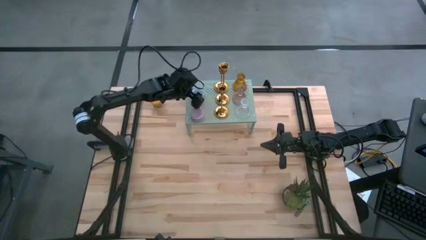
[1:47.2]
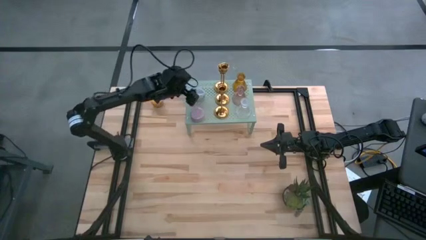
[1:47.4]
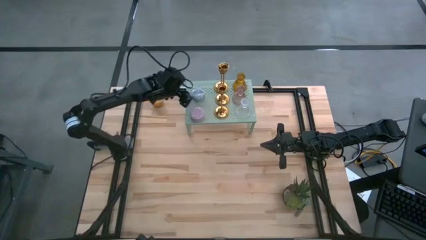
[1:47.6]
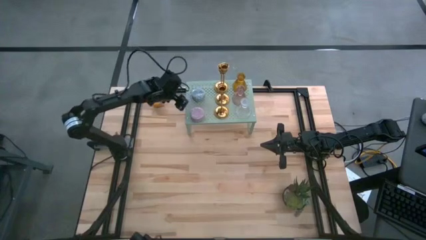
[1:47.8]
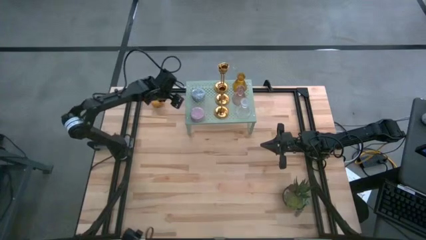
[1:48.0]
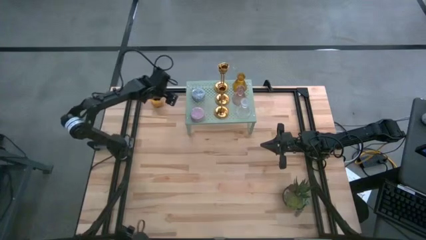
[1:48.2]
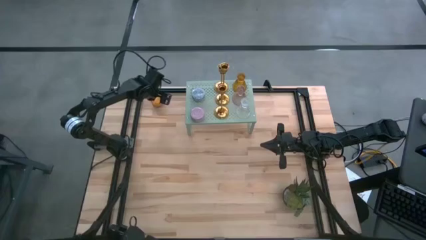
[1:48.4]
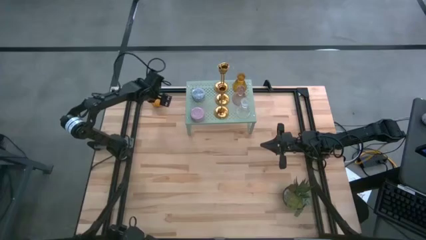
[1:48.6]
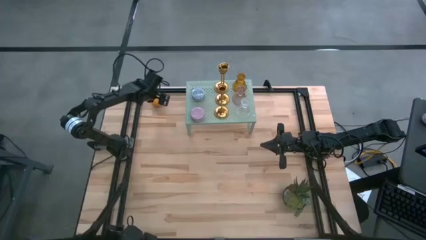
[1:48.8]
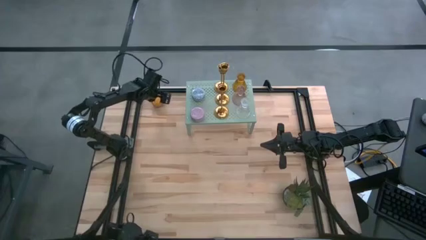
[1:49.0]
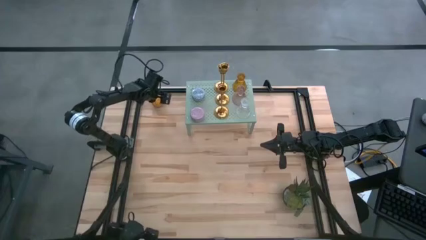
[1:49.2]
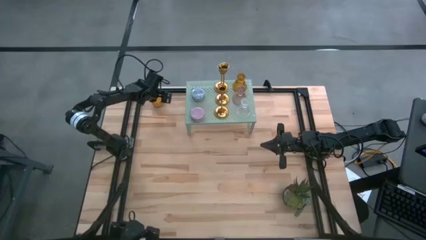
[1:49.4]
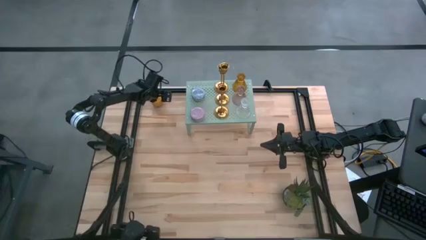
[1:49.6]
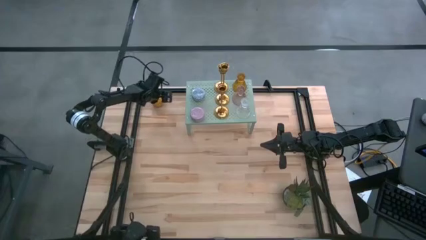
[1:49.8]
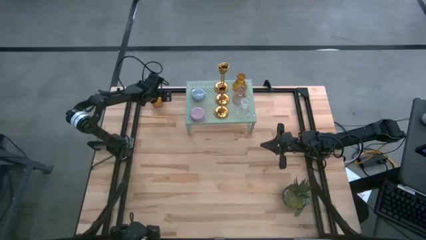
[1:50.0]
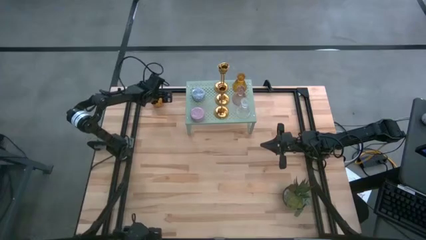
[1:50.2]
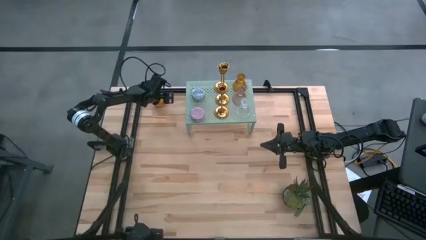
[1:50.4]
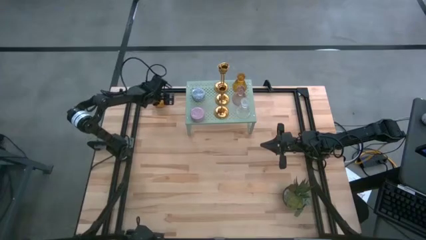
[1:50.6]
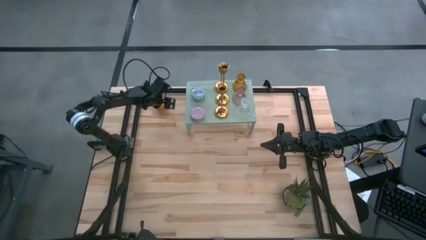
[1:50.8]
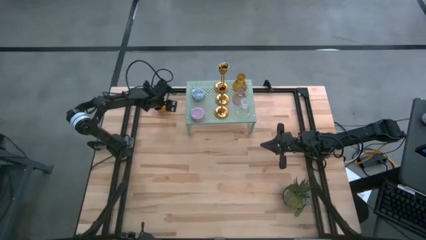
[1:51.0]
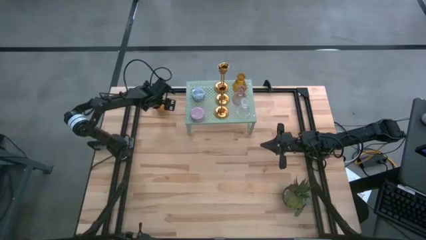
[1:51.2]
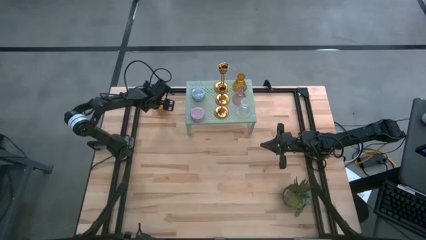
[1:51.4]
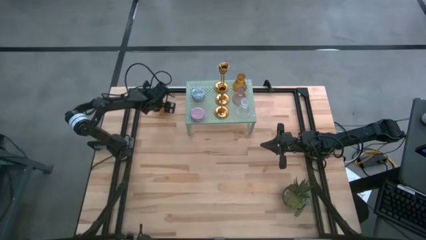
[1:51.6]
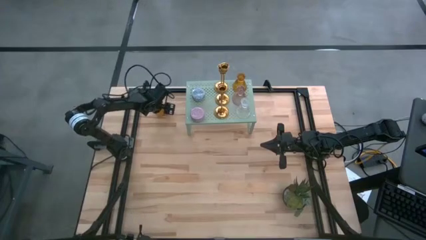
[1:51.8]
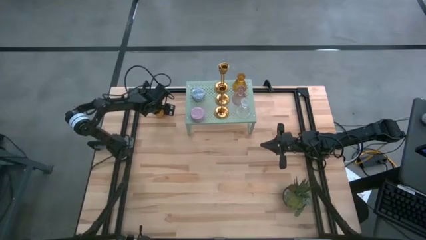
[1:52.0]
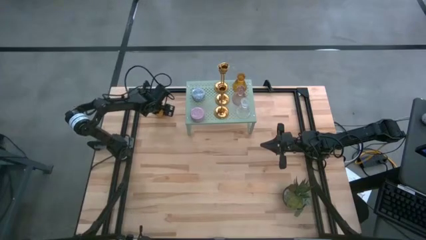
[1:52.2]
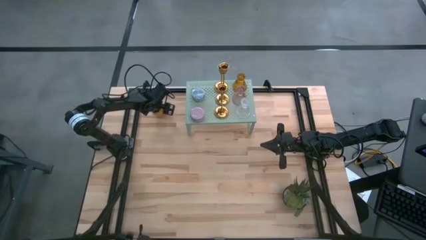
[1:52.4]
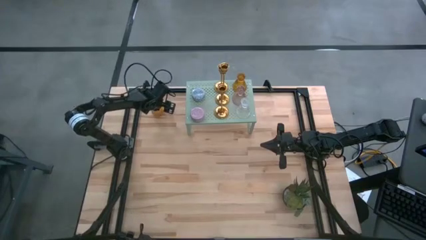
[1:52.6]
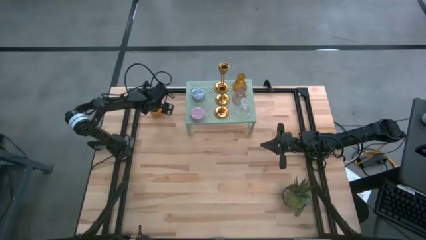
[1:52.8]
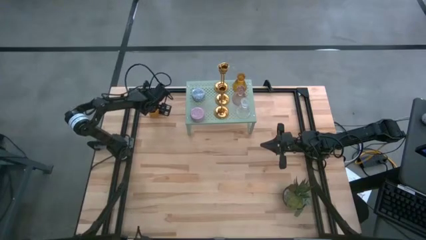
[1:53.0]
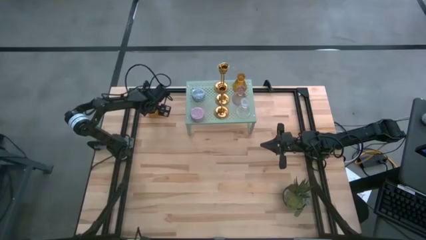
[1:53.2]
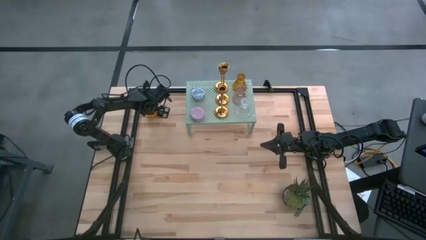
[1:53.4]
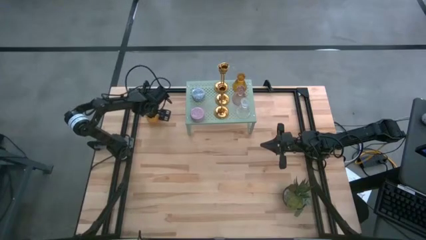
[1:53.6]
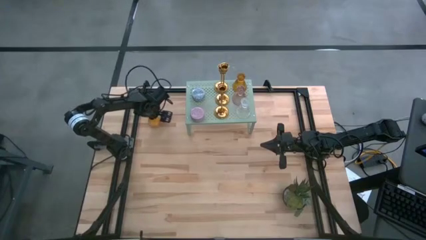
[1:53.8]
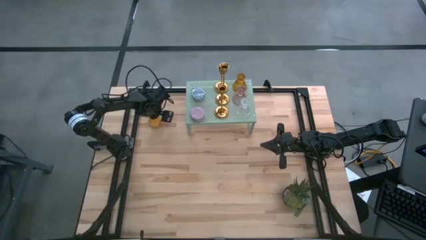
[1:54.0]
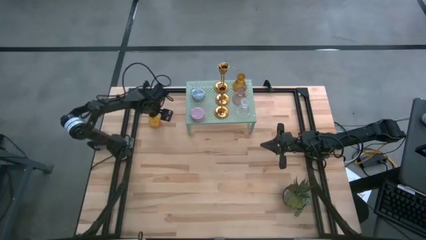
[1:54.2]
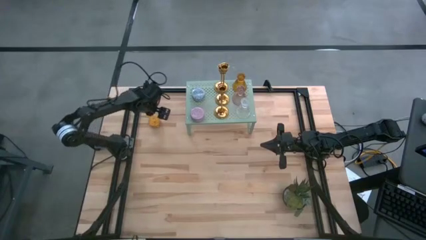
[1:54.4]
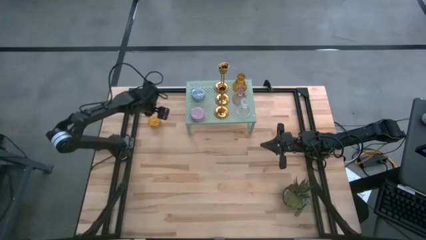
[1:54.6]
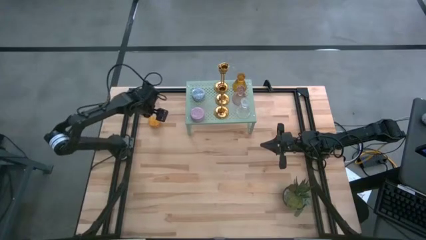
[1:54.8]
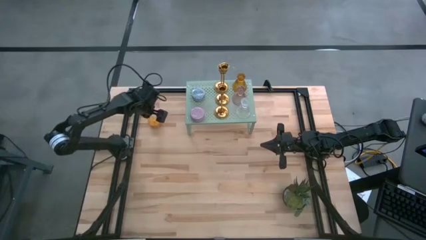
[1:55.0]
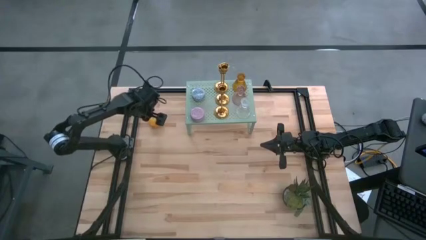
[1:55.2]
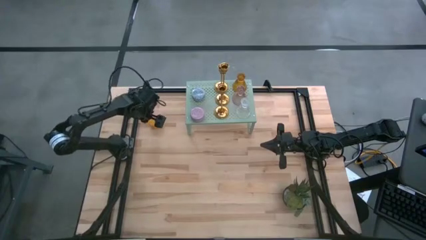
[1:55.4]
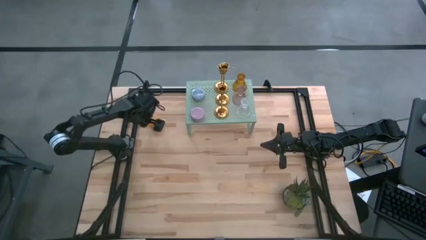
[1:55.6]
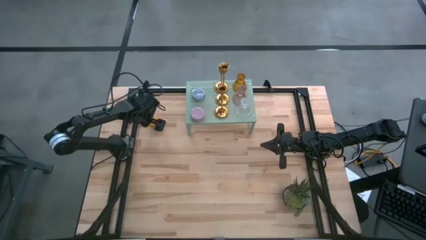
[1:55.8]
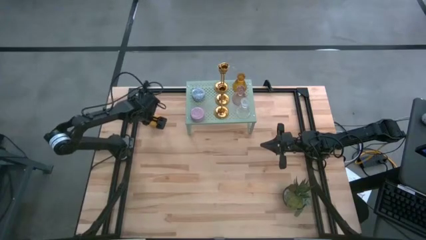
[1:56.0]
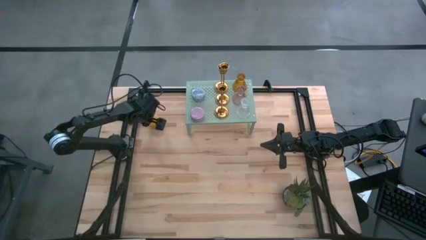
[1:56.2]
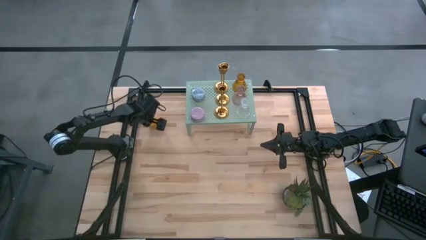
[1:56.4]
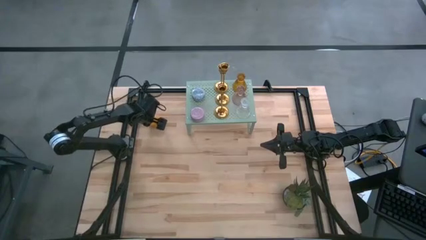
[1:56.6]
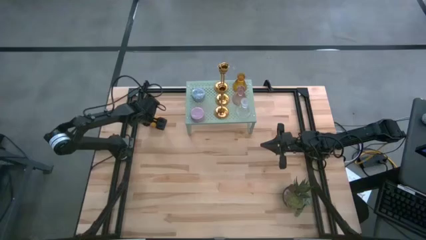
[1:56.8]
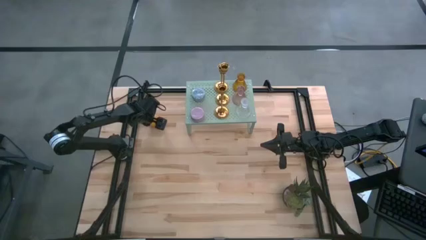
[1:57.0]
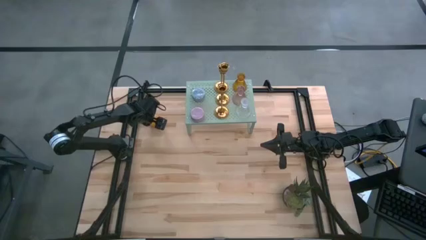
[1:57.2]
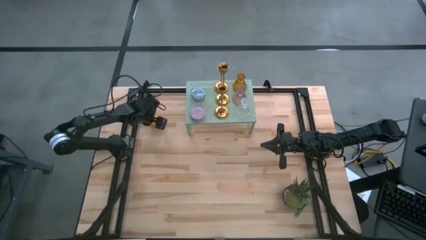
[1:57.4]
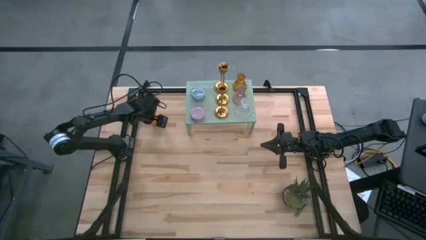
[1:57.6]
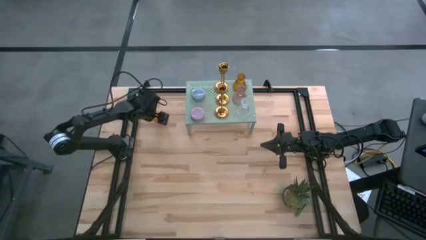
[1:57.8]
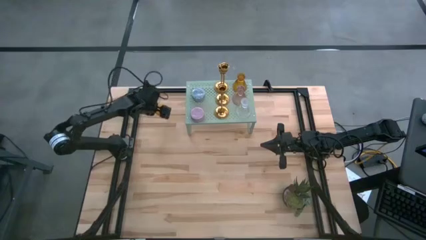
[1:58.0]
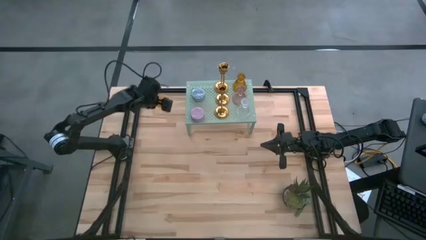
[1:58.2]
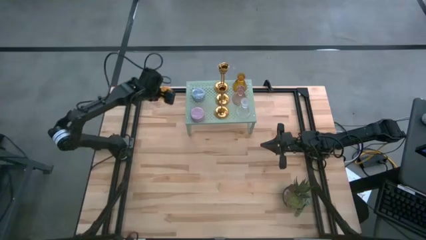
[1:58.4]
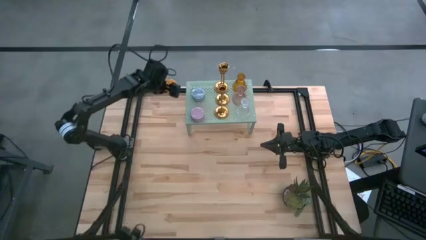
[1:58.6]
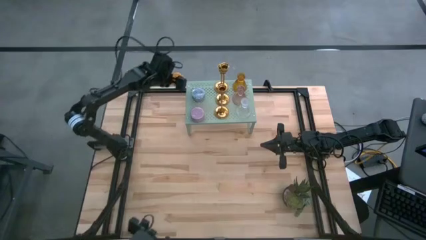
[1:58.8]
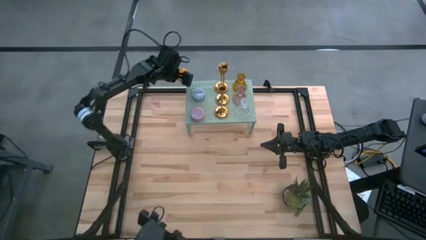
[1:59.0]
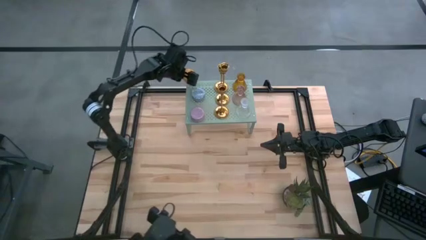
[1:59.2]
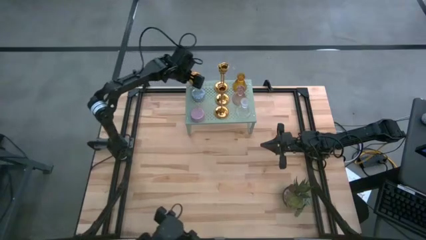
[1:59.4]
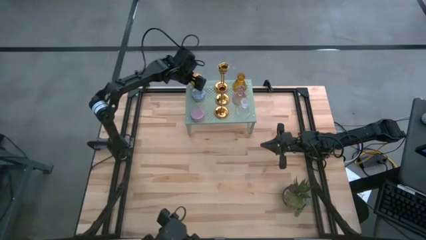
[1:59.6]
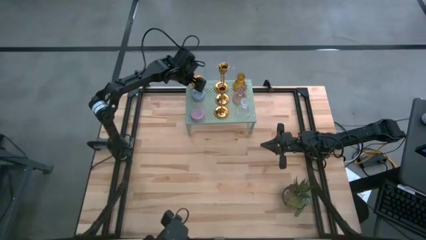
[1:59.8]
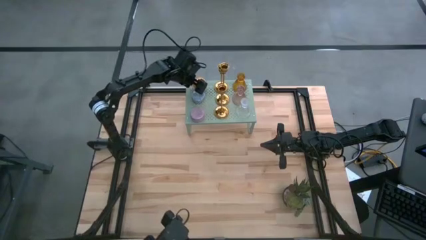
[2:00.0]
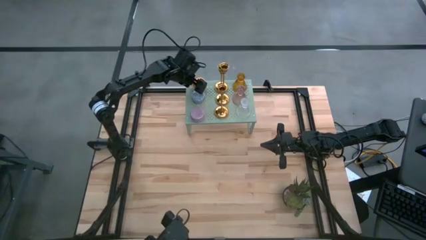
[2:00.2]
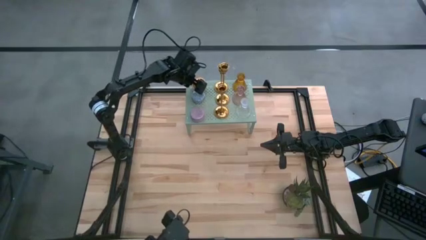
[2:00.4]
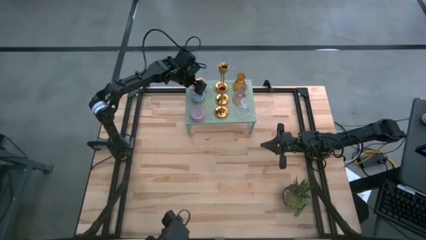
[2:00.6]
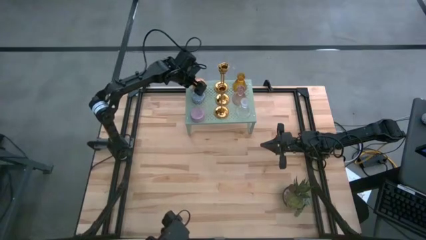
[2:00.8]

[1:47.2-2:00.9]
Task: Pick & Place candle stick holders
Put the yellow scented candle on the shelf

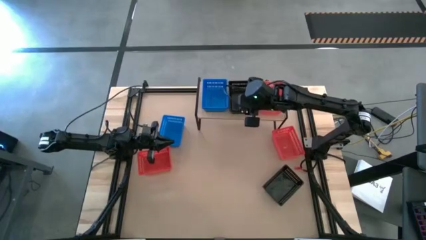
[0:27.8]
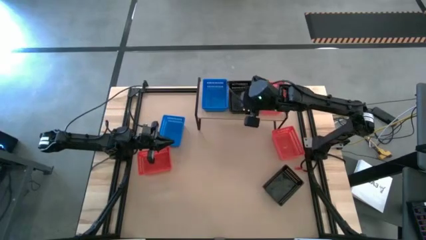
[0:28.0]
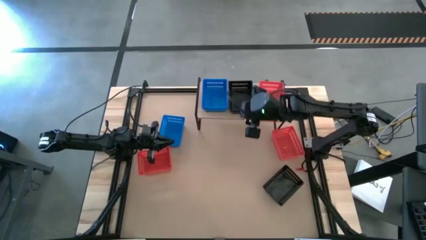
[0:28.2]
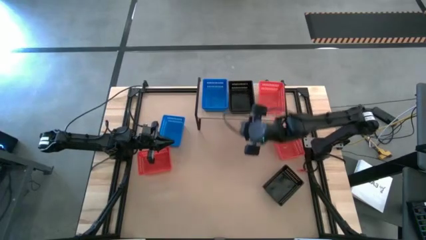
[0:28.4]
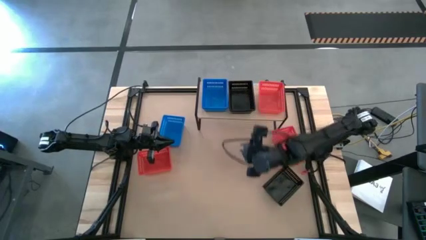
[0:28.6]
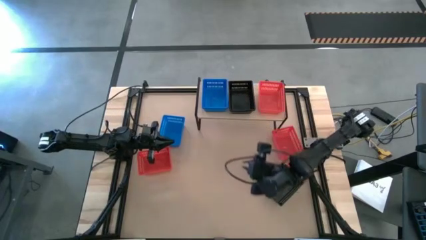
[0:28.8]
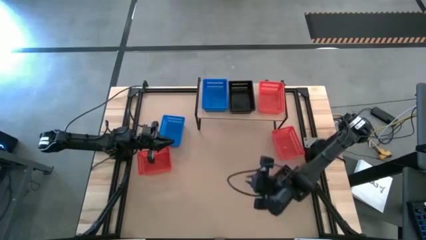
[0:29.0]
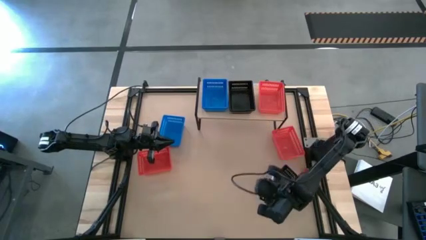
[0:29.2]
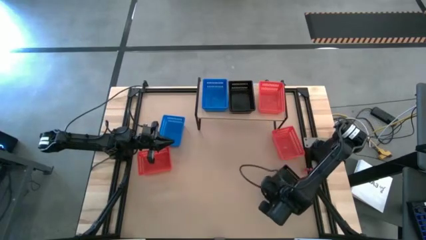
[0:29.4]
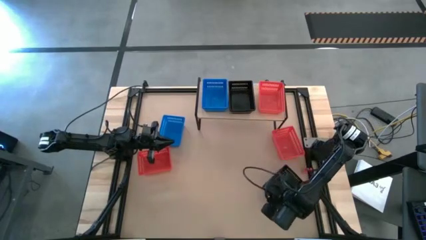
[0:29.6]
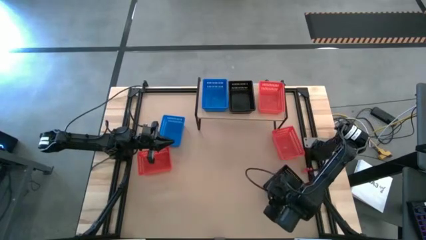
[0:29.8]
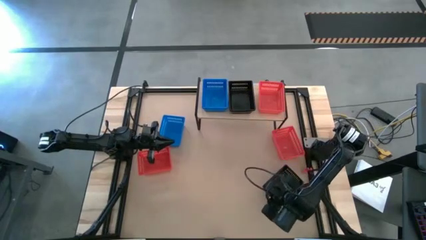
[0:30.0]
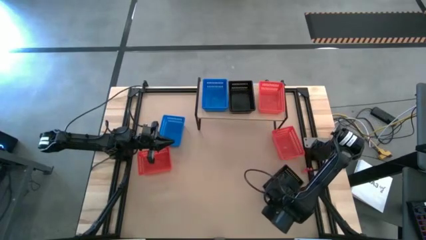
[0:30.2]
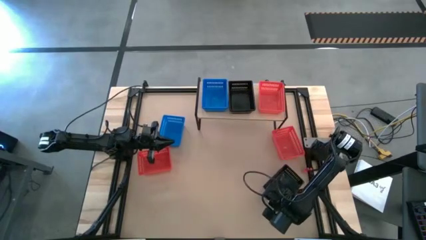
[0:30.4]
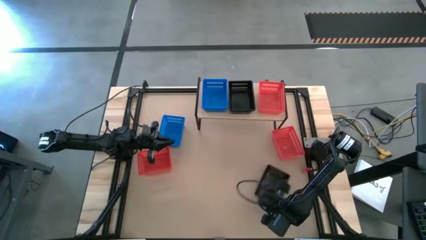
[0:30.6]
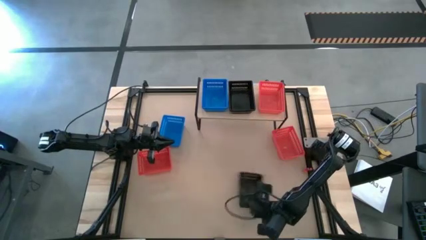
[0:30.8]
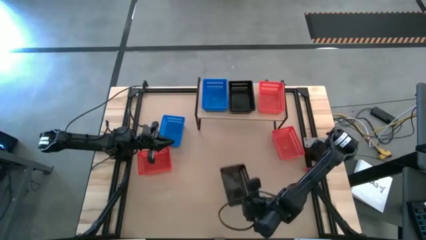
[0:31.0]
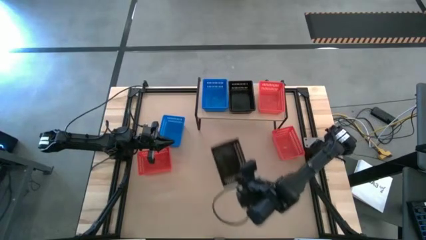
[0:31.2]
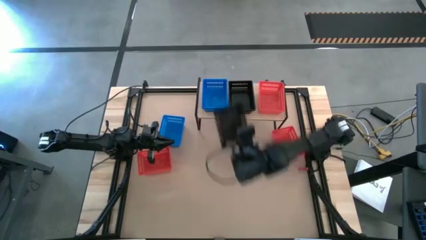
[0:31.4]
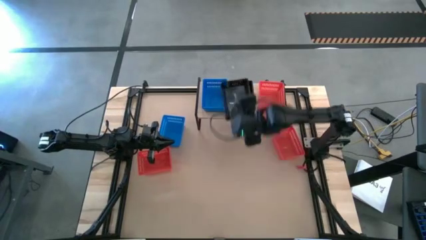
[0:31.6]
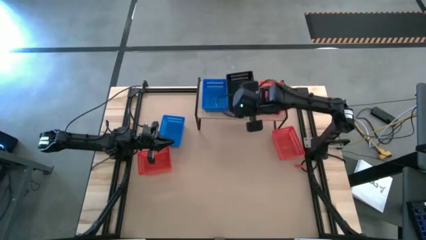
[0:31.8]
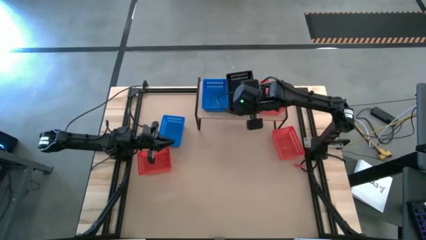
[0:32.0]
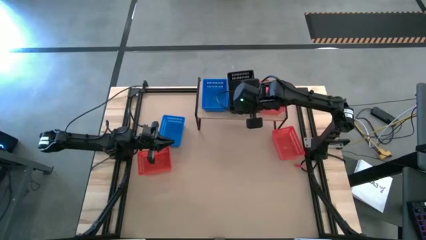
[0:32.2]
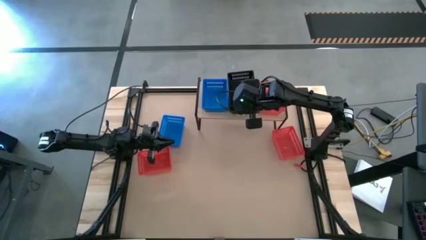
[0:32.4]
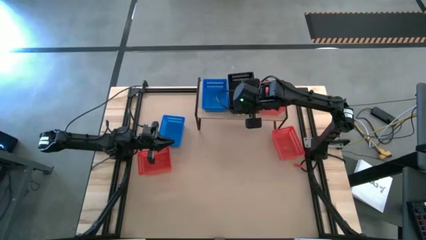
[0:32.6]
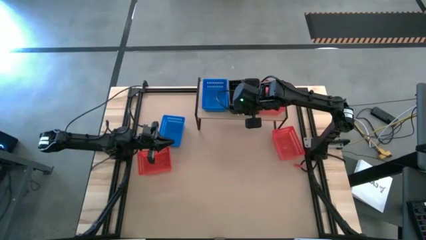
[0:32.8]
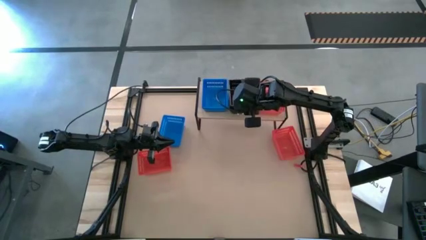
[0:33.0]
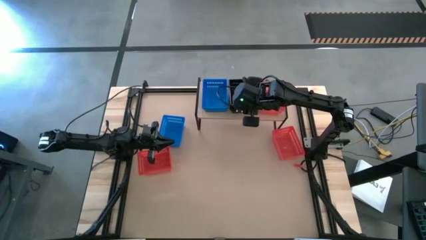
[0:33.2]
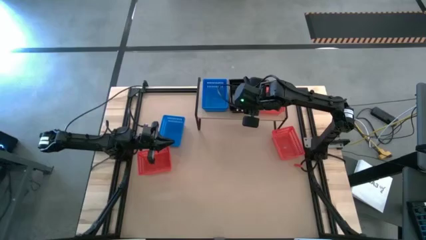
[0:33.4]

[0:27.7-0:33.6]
Task: Stack baskets on shelf by color
Stack the black basket on top of the stacked black baskets on the shelf
